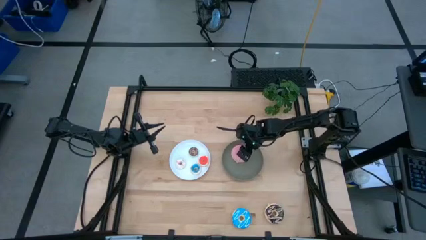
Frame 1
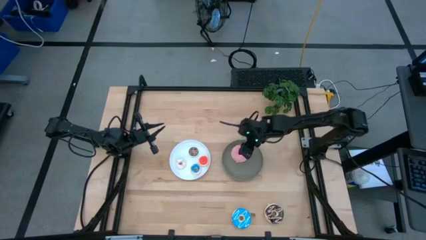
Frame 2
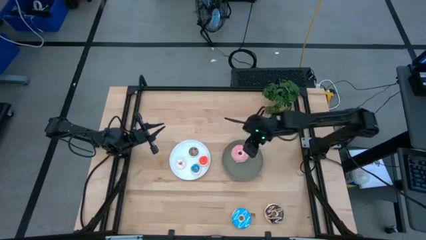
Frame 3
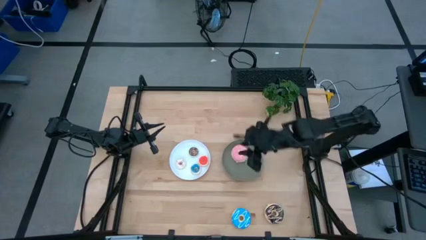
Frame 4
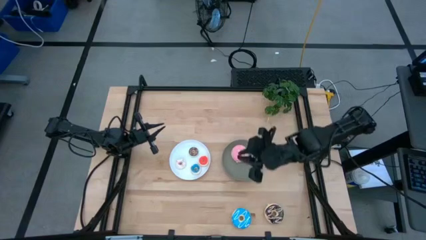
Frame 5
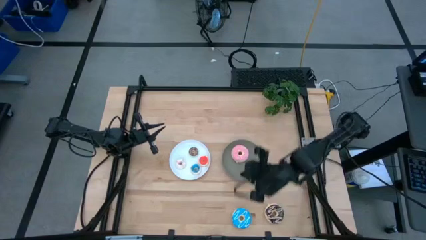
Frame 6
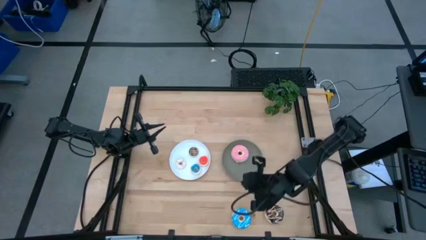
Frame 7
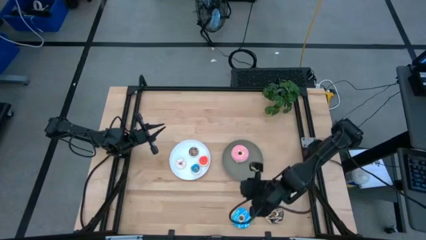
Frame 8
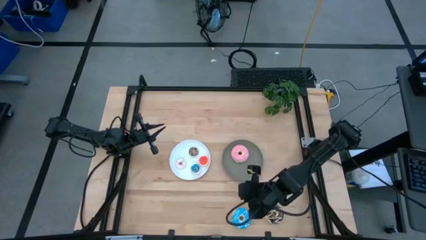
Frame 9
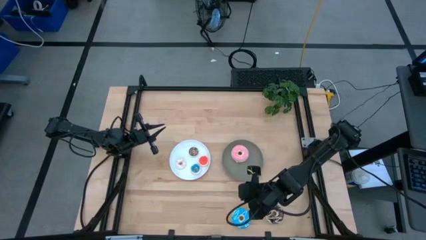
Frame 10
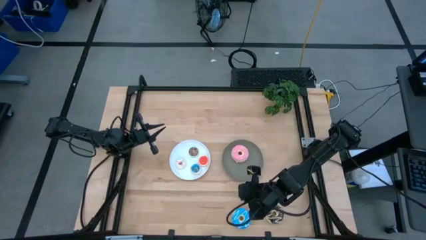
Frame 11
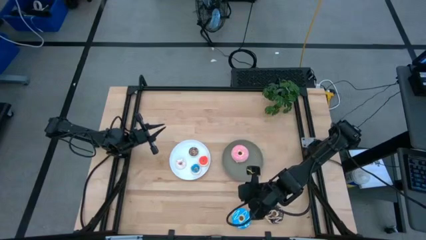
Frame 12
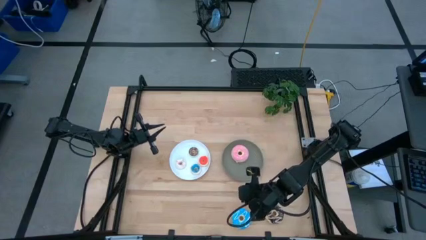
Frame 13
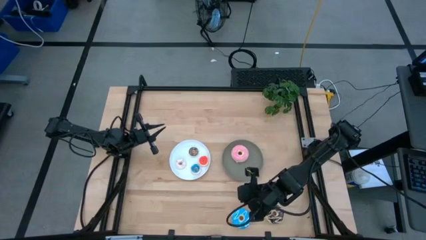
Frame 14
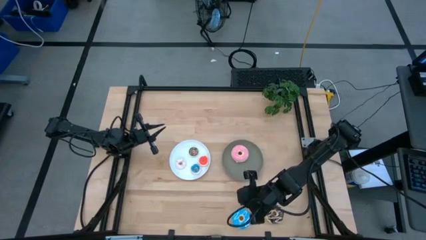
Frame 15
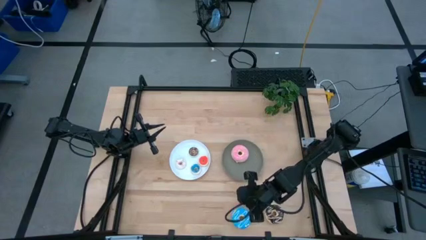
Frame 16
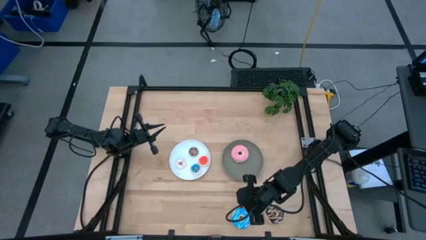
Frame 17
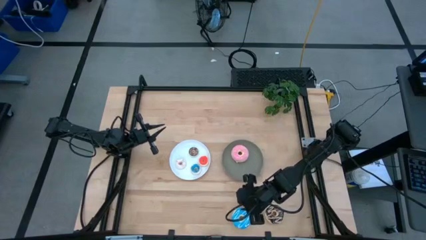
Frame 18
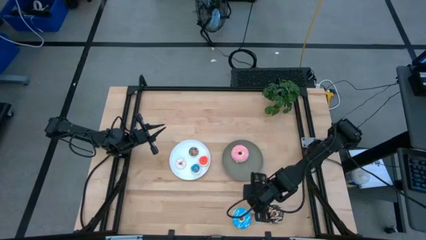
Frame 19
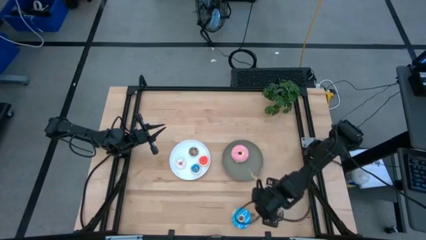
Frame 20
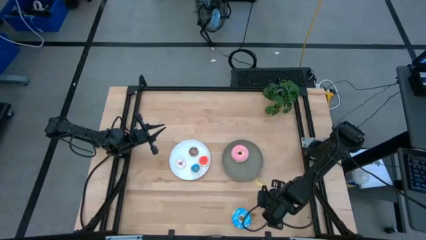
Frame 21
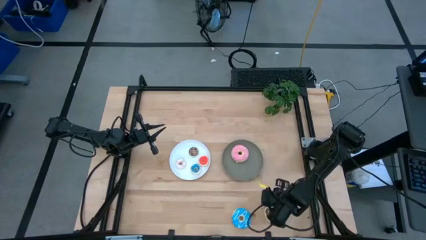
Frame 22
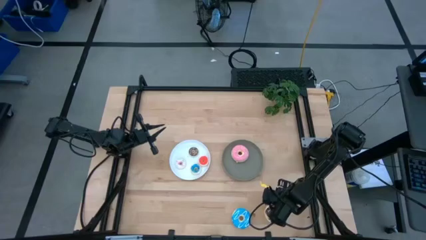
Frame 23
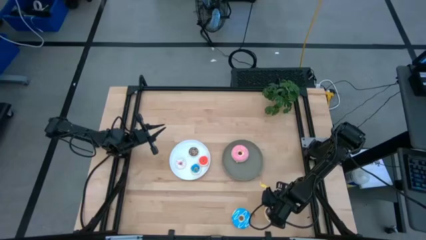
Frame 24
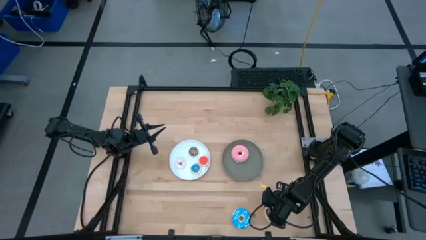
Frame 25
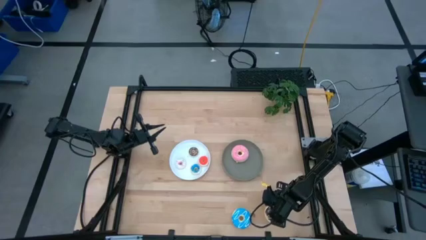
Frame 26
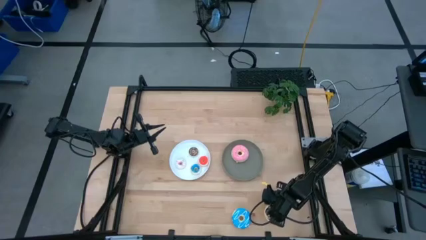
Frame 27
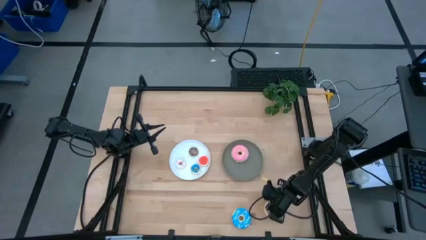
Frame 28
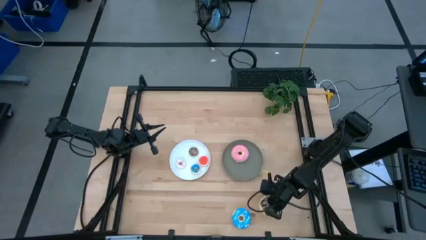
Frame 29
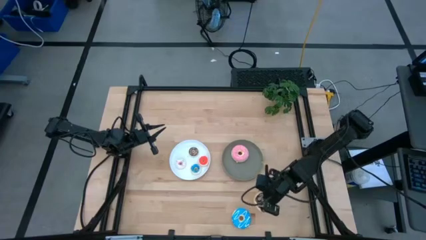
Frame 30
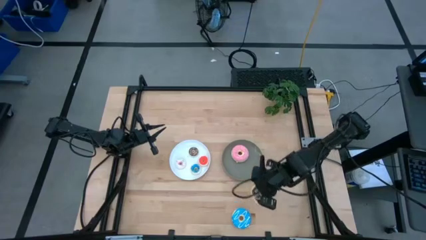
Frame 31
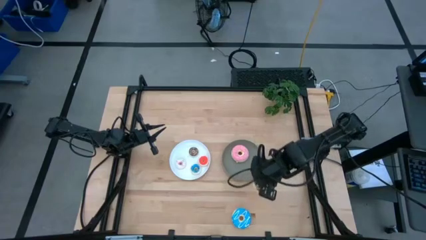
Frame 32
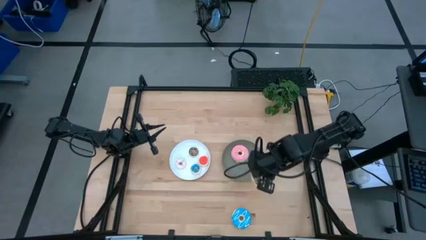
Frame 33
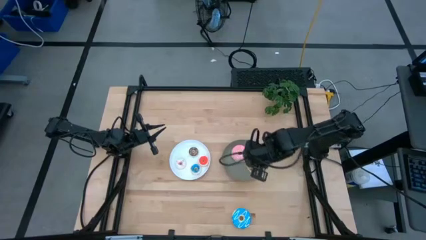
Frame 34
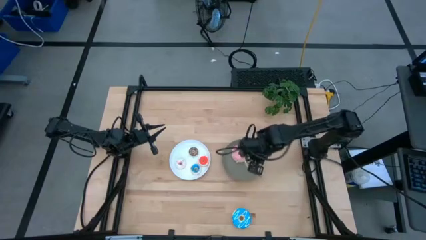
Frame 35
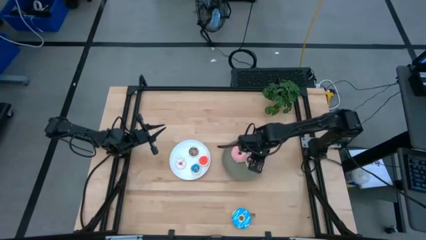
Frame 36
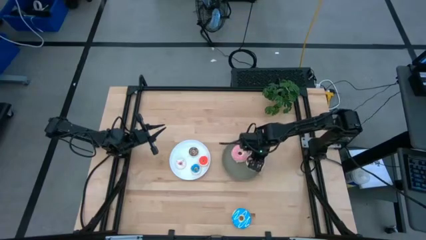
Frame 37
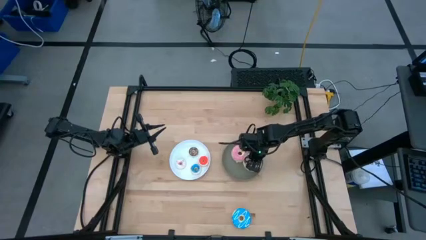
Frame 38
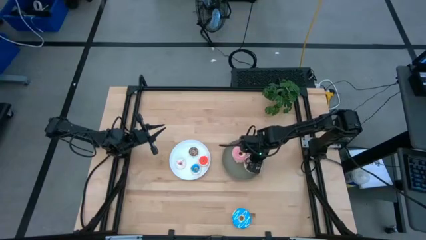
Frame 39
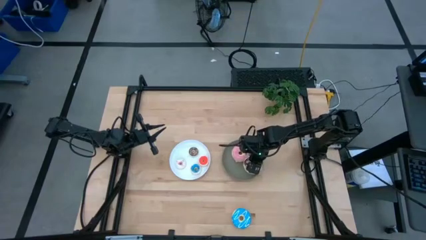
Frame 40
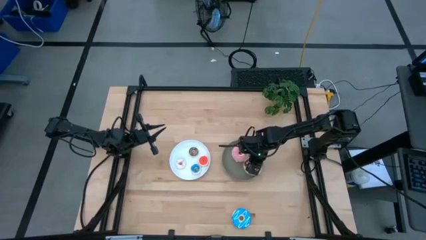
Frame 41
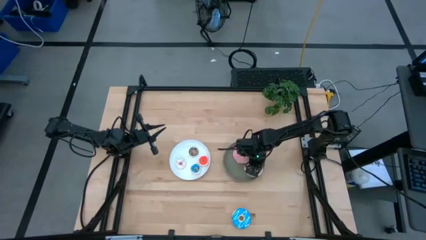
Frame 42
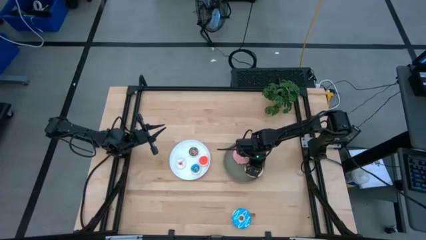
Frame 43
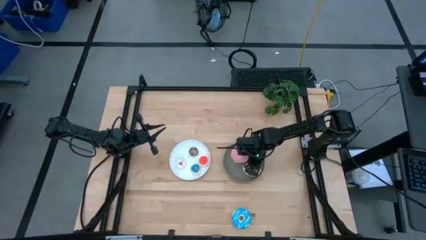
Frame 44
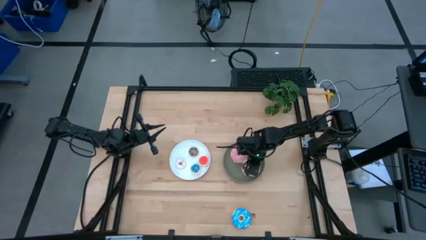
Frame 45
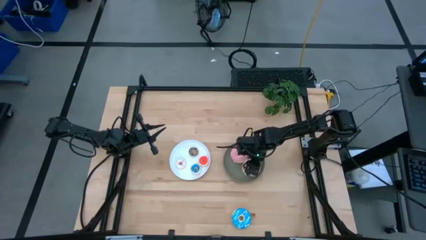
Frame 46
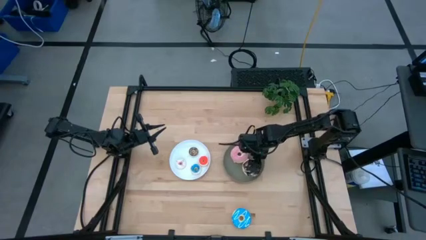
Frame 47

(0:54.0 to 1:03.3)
Task: Pick & Place donuts
Put the big black doughnut on the gray plate
